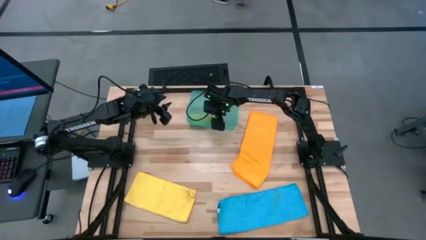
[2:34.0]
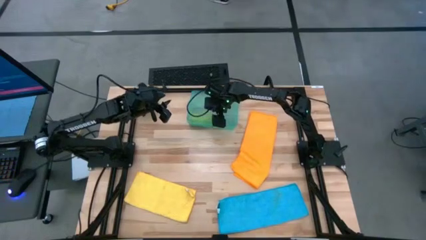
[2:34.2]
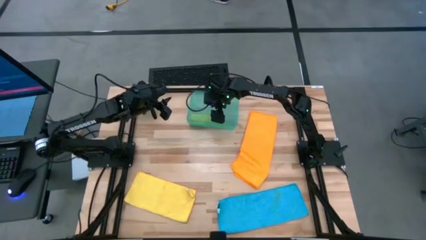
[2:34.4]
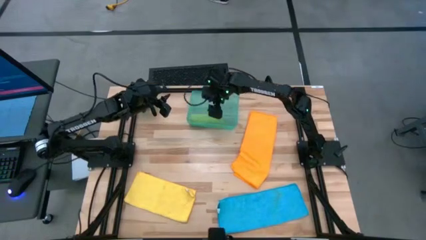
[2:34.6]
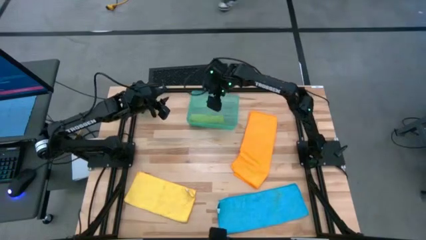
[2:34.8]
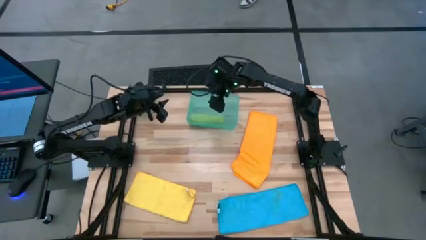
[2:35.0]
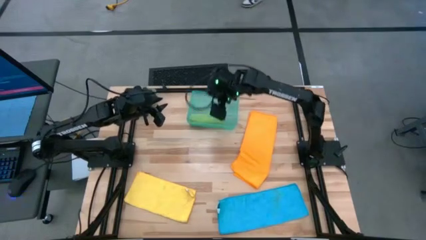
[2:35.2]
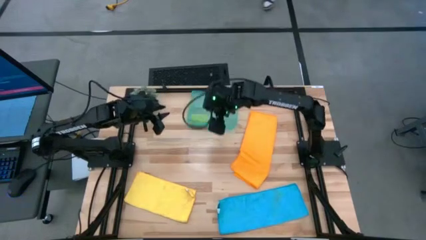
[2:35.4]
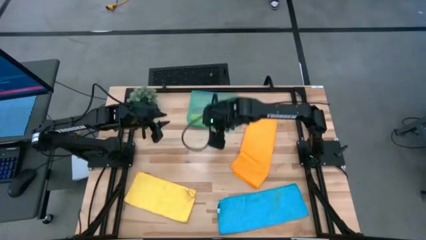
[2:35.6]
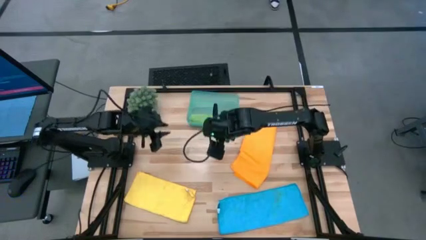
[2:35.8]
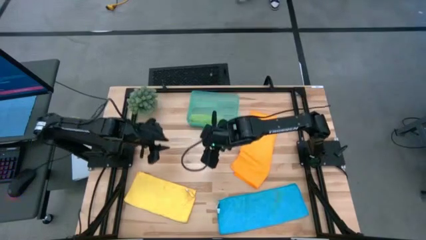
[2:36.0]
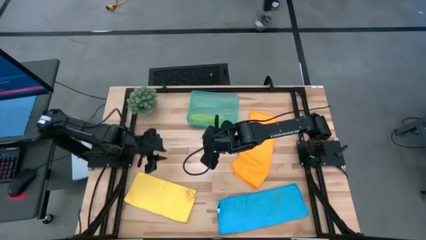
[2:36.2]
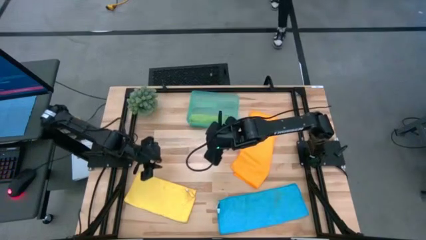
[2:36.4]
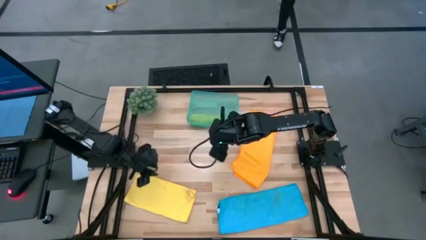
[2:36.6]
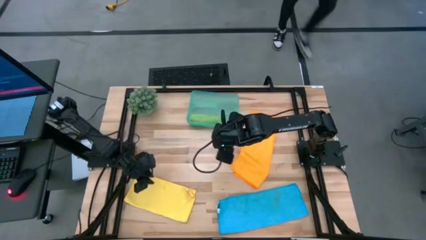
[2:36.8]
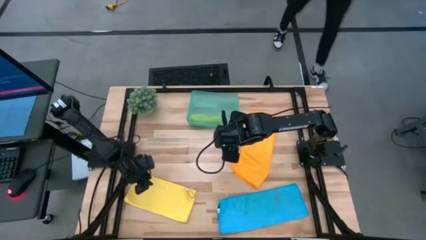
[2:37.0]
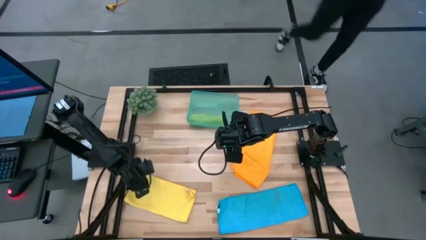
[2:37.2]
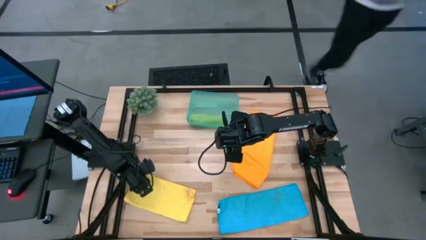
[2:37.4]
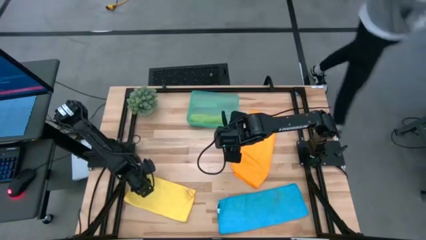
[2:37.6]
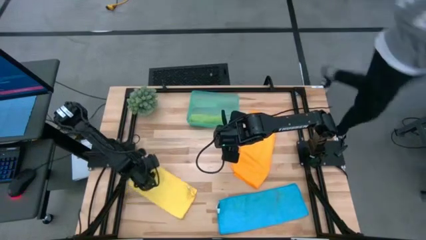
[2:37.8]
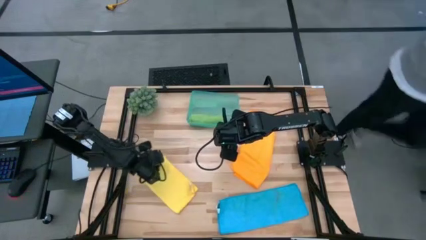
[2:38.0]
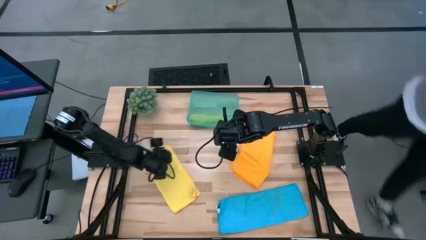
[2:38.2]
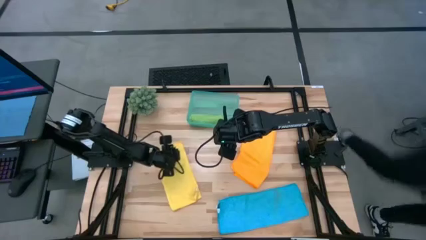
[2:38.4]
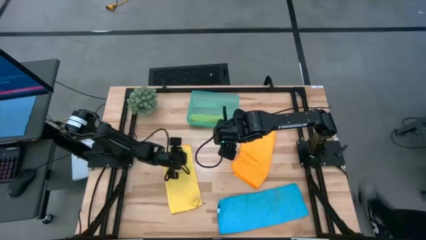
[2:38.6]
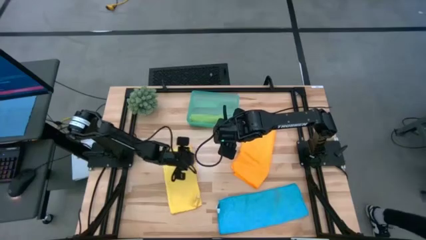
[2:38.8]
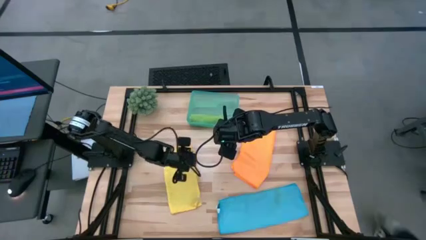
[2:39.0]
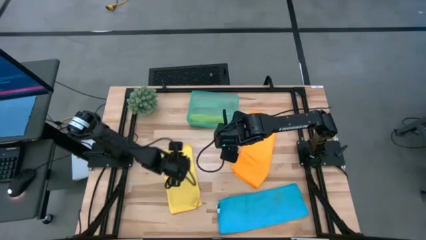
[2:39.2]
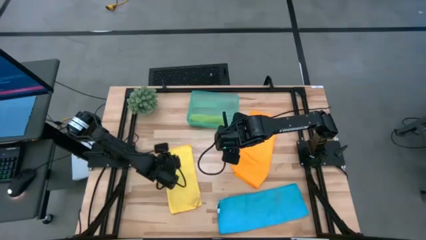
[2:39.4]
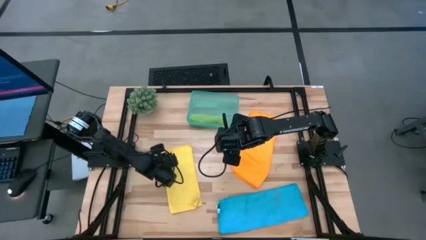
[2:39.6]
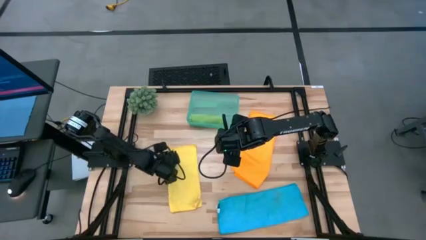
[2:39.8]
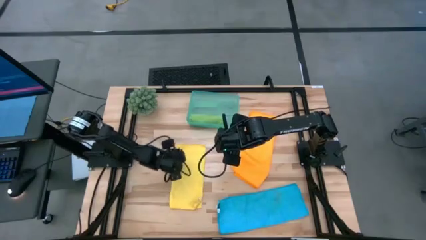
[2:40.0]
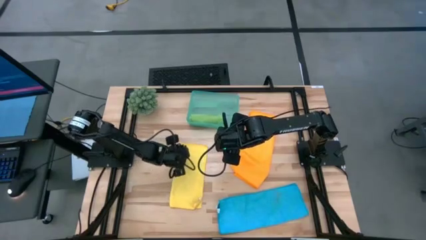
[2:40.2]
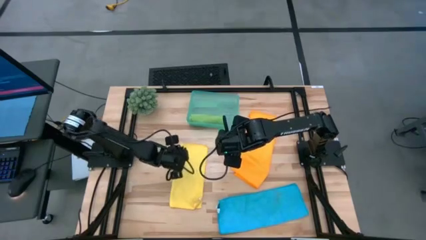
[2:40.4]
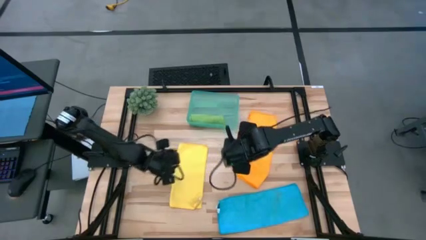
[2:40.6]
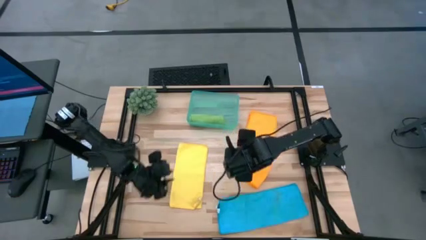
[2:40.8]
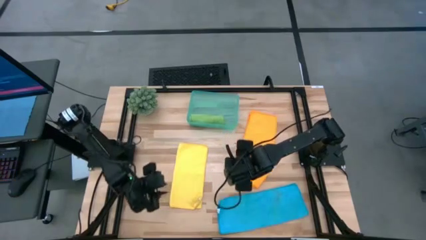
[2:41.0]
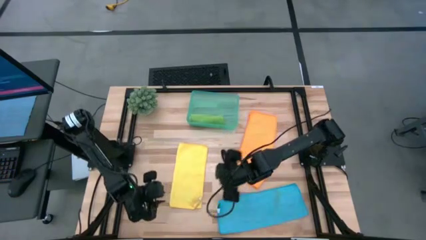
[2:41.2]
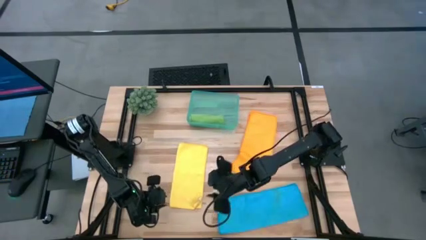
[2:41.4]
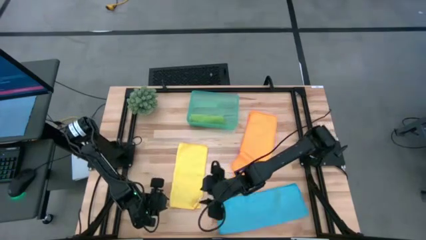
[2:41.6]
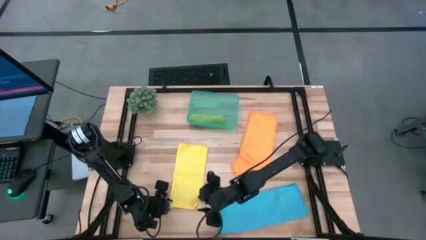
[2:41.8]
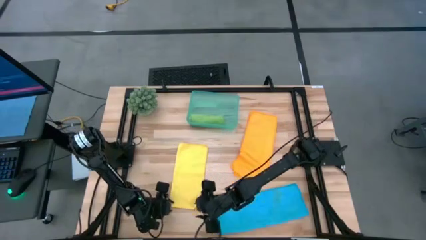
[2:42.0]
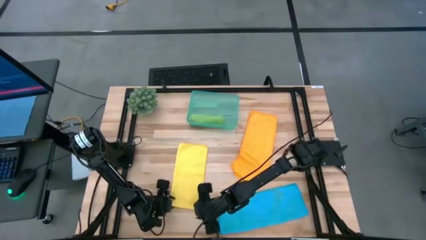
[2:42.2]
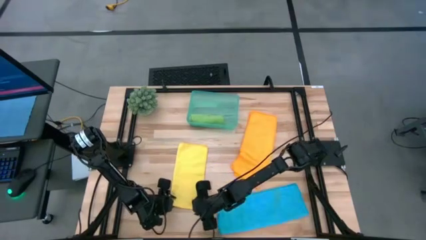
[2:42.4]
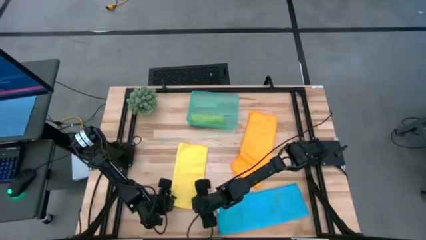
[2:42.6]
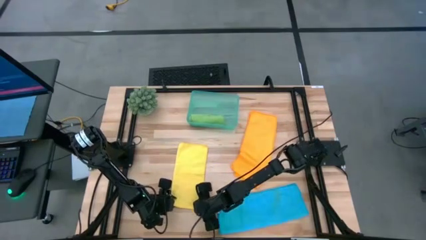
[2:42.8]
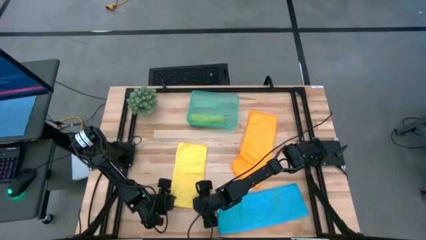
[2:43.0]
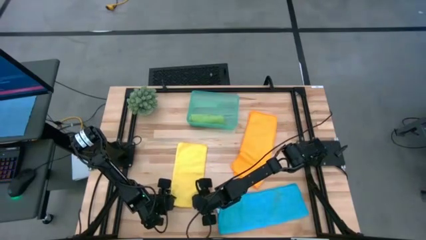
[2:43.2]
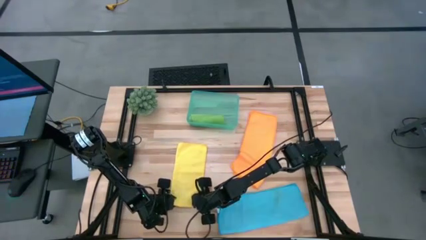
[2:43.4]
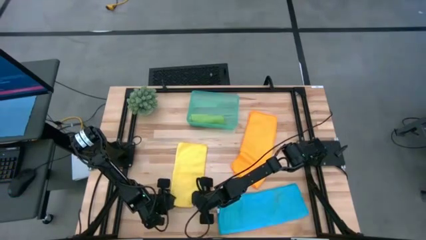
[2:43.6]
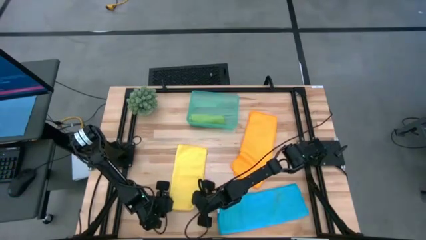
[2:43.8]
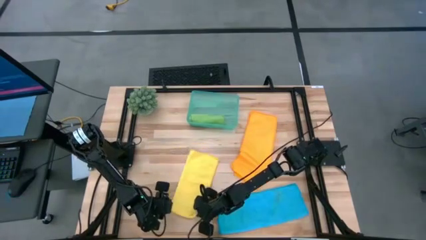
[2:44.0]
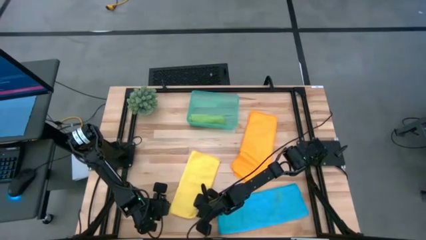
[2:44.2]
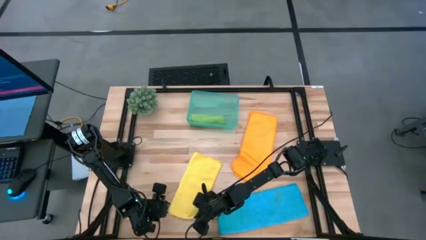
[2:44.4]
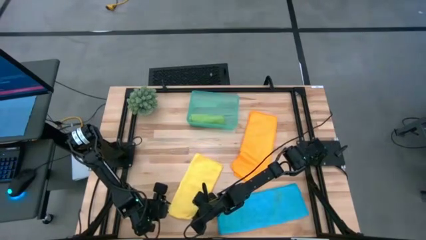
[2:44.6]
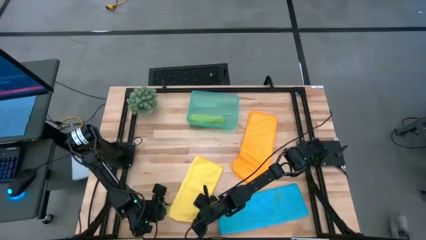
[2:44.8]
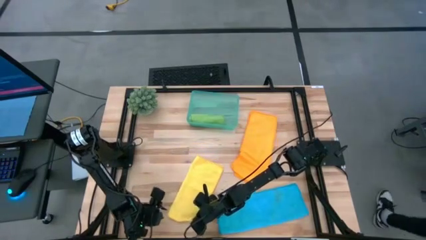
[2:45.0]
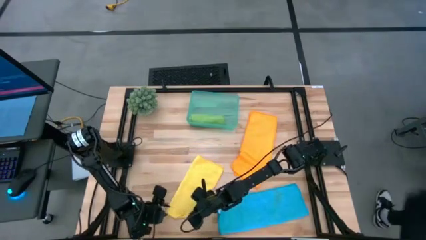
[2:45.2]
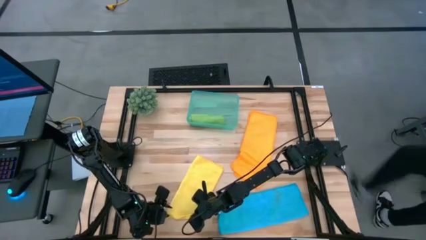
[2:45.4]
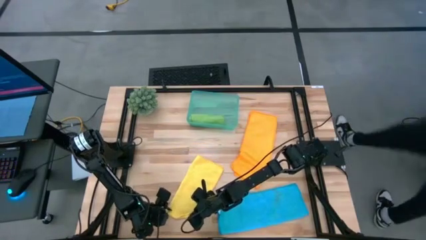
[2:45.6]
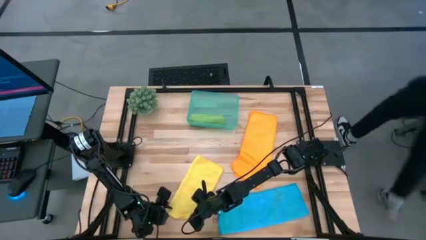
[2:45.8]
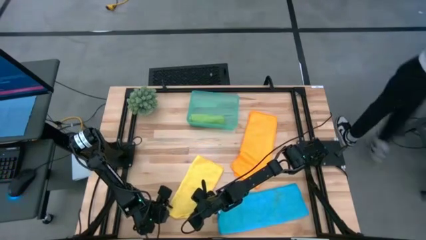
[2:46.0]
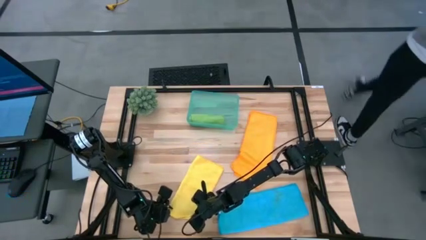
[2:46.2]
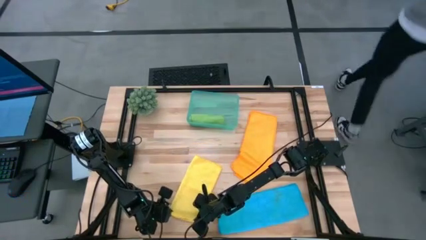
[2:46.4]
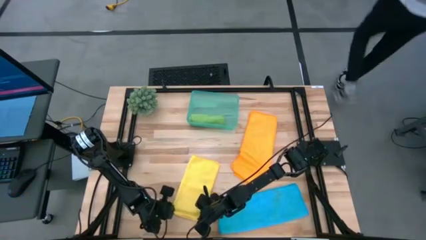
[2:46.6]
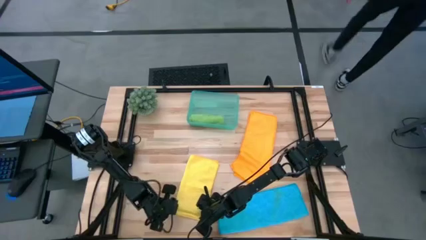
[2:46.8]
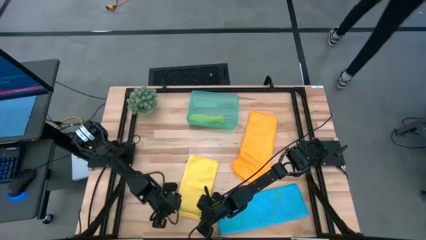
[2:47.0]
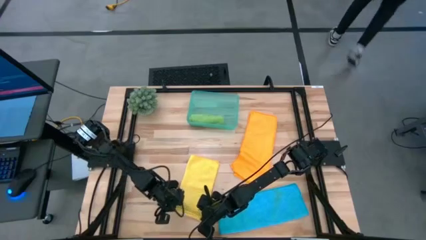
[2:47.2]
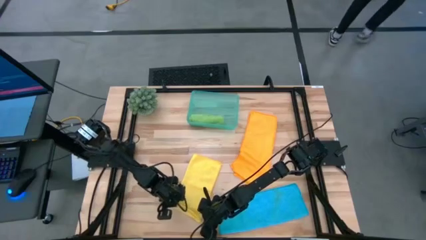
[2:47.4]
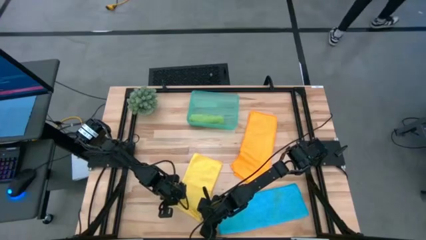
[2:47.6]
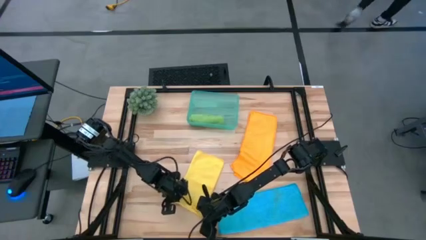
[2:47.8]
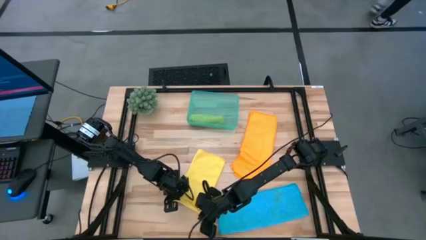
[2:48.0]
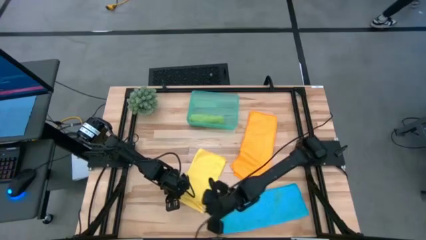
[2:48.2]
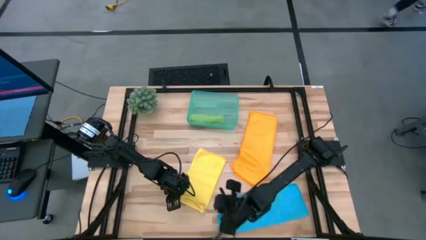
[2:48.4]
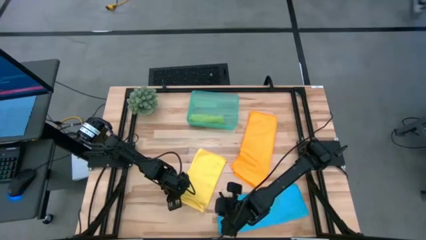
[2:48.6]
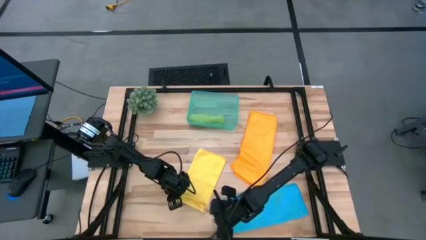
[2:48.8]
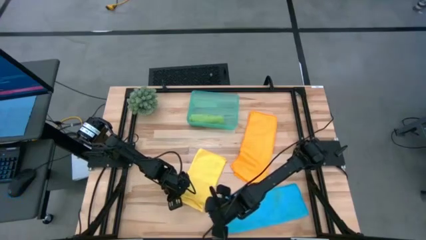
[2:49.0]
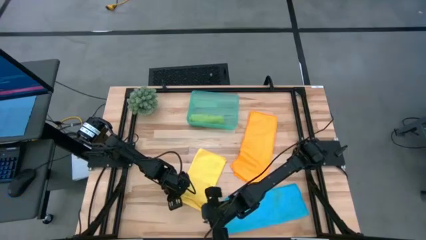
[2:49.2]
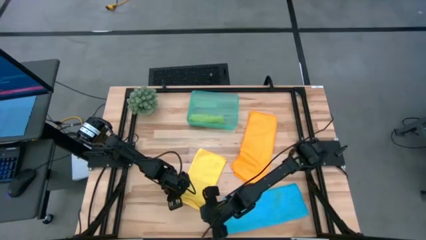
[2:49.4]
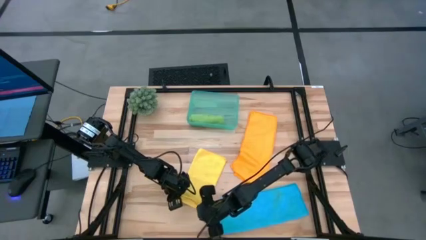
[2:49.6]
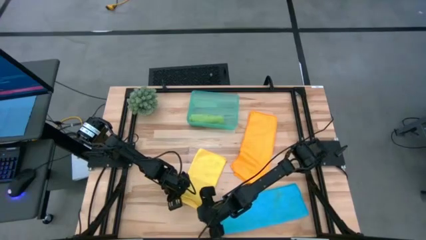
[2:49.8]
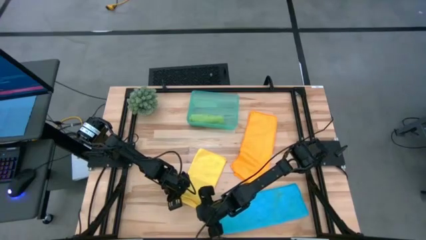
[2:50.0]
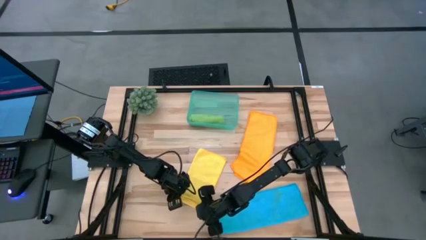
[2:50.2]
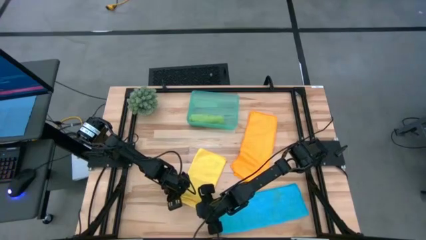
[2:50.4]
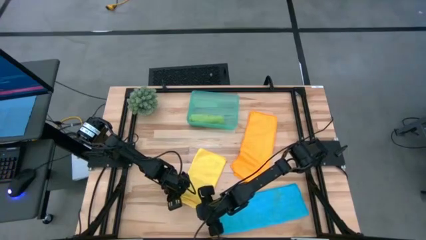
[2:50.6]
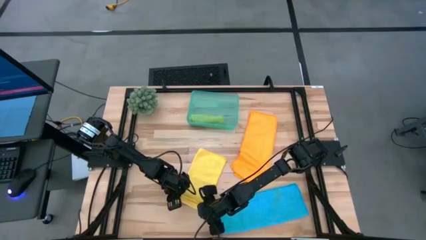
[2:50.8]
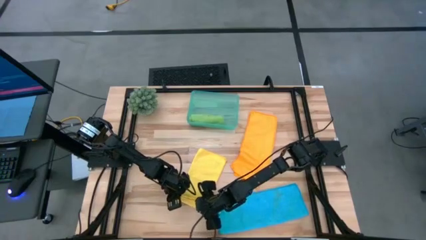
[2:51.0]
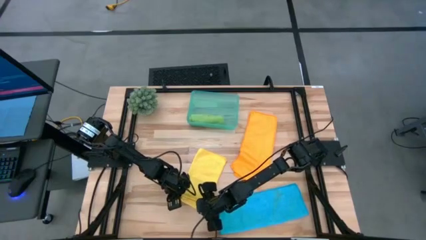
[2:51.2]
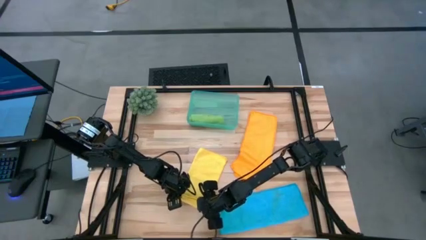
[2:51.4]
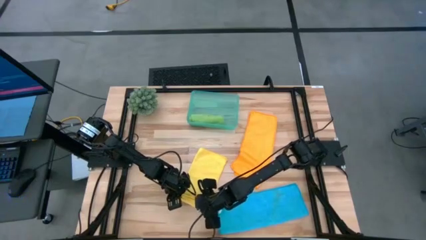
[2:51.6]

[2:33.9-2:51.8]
Task: Roll microfiber towels into tight, uniform cylinder then place into a basket
Roll the yellow towel
